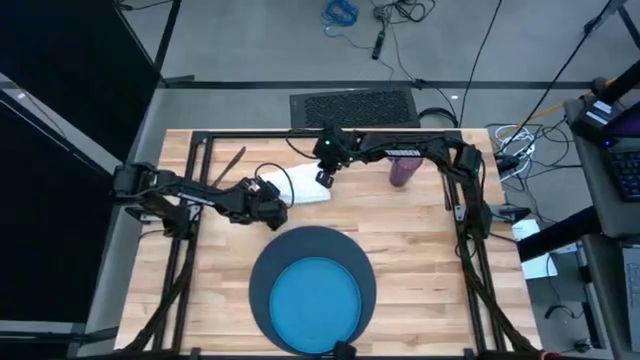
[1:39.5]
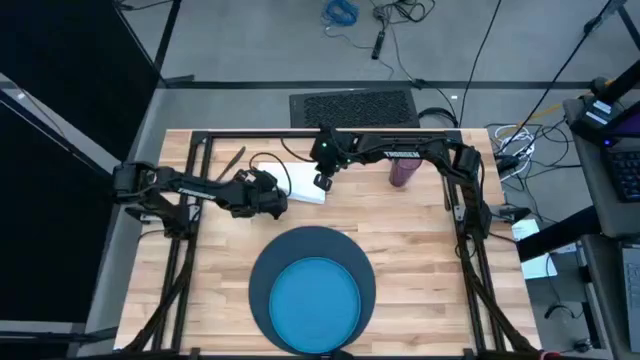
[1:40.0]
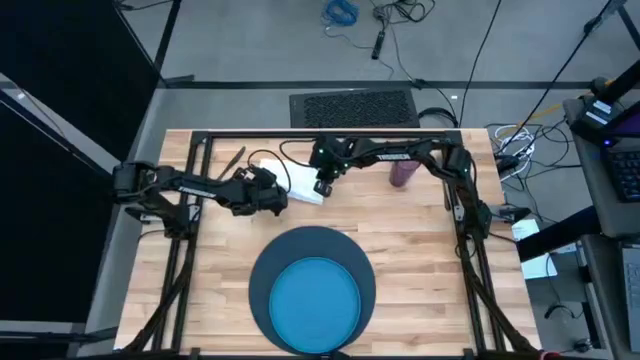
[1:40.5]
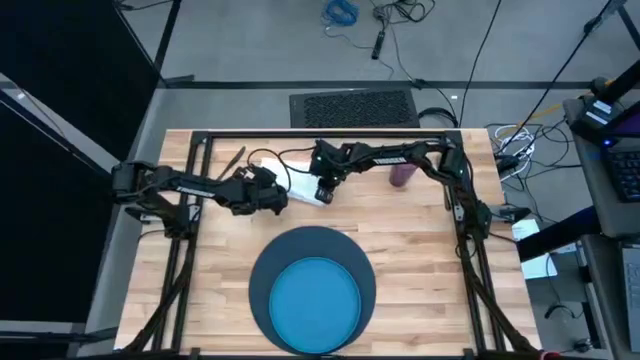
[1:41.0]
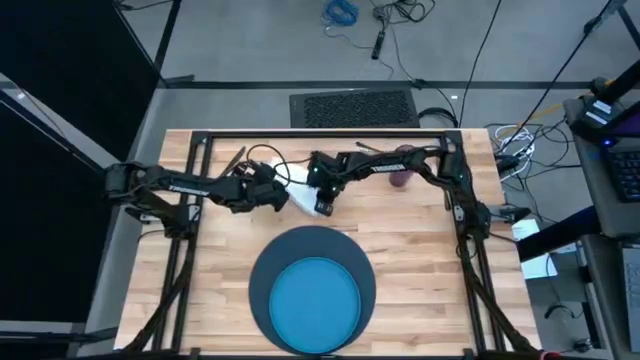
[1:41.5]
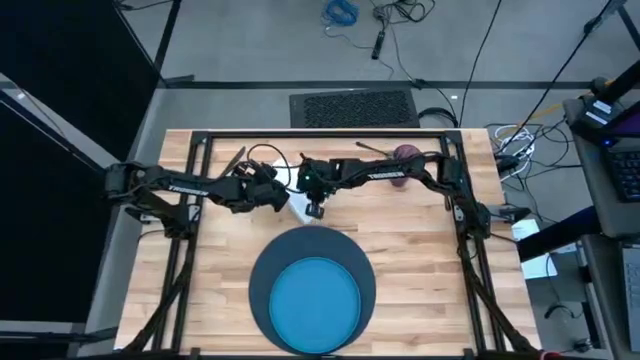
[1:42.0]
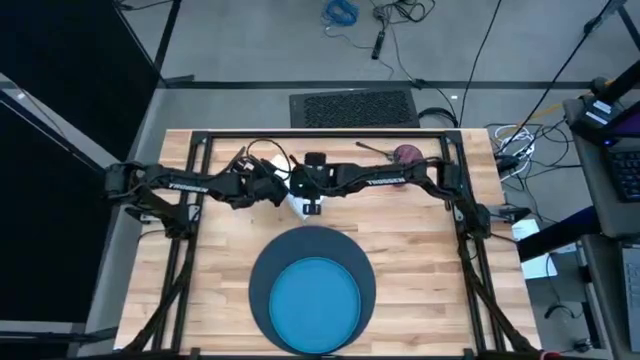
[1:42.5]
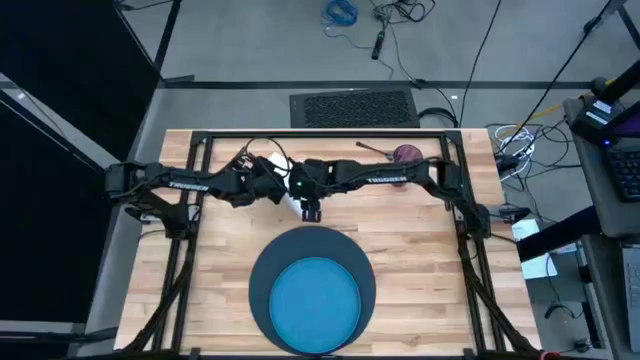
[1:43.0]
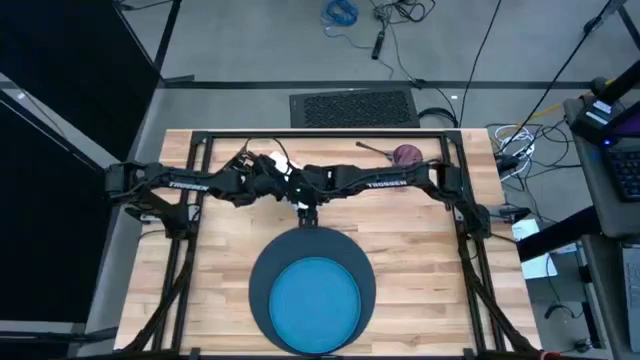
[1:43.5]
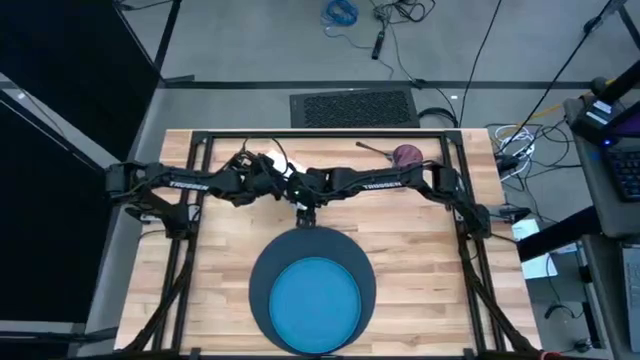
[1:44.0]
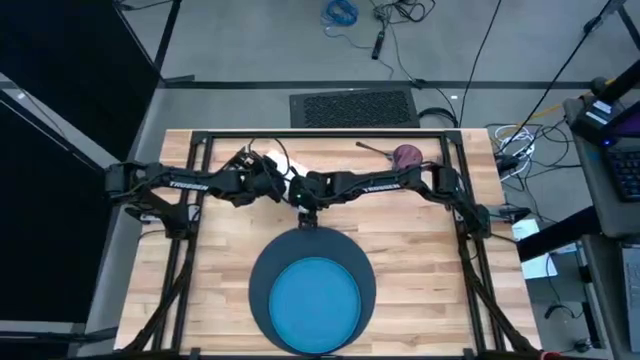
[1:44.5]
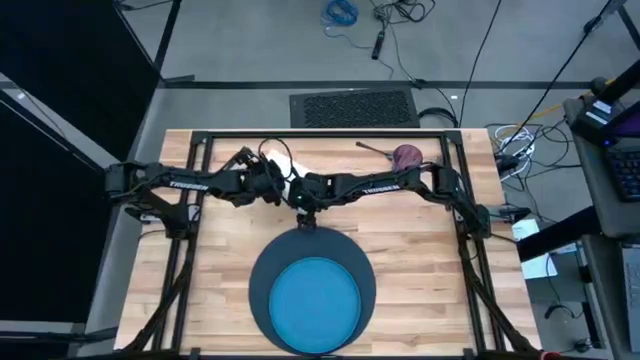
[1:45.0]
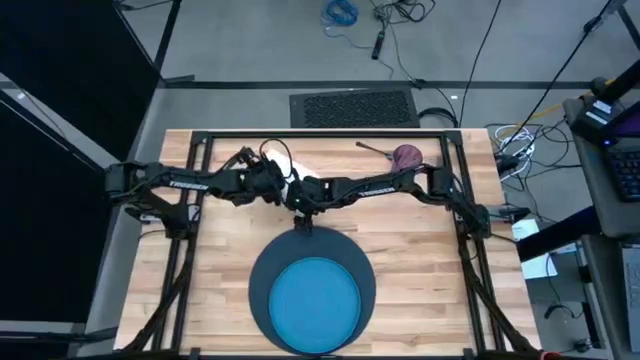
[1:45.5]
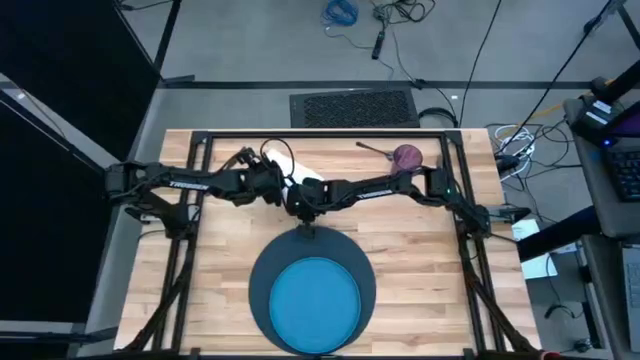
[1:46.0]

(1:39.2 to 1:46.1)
Task: Set table place
Fold the white napkin

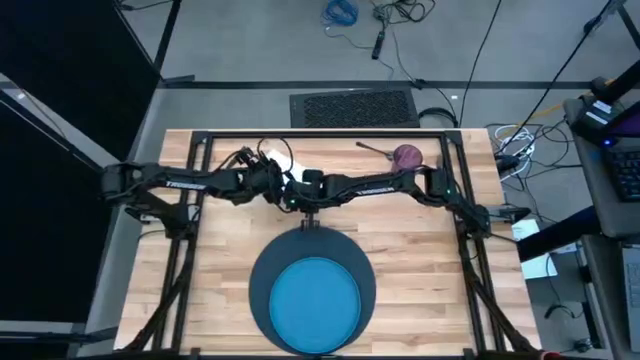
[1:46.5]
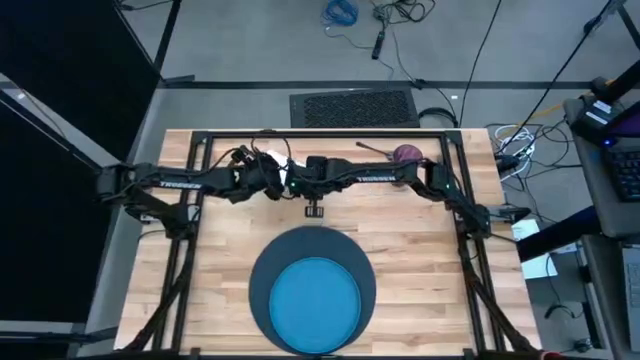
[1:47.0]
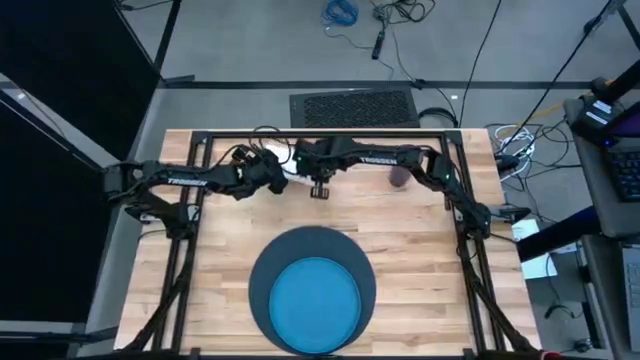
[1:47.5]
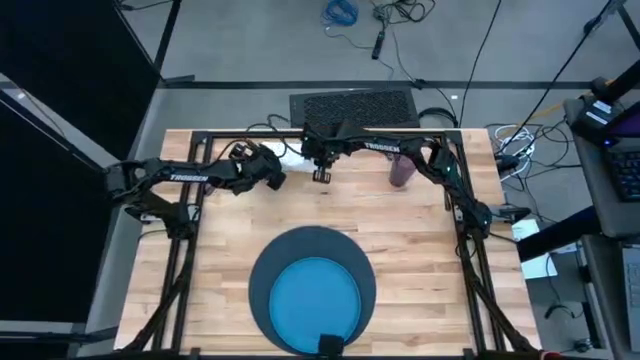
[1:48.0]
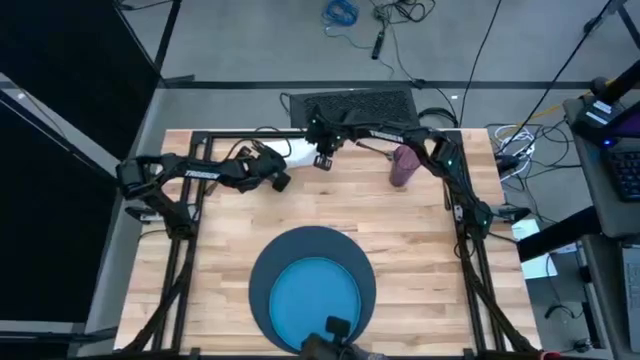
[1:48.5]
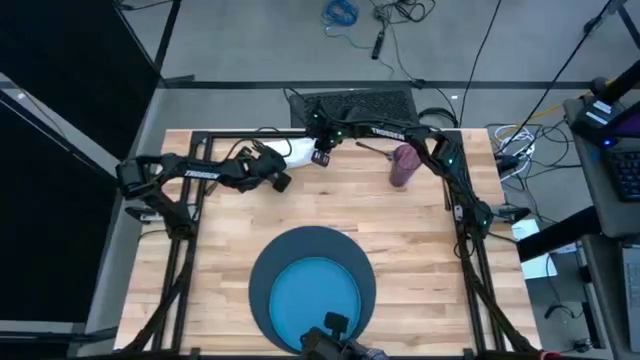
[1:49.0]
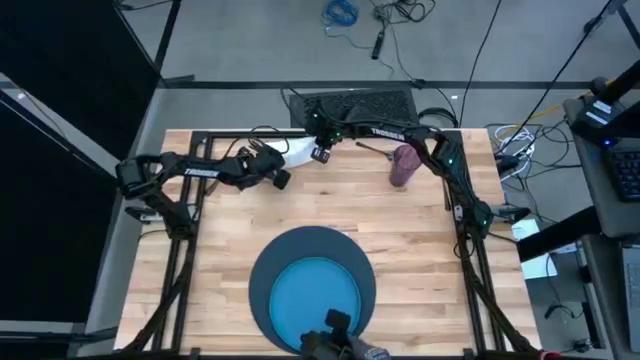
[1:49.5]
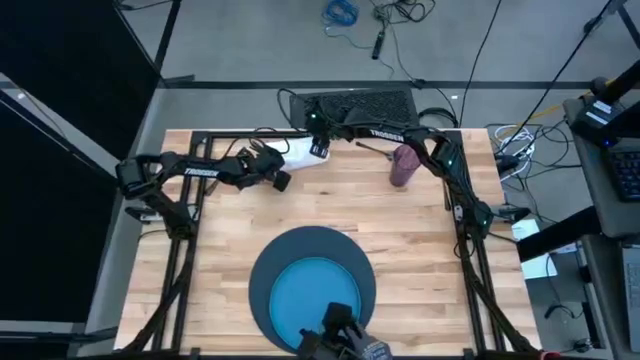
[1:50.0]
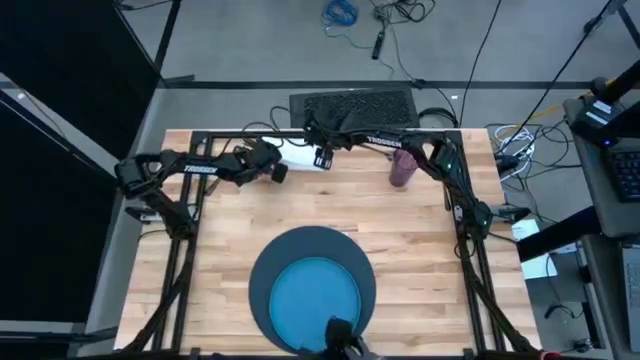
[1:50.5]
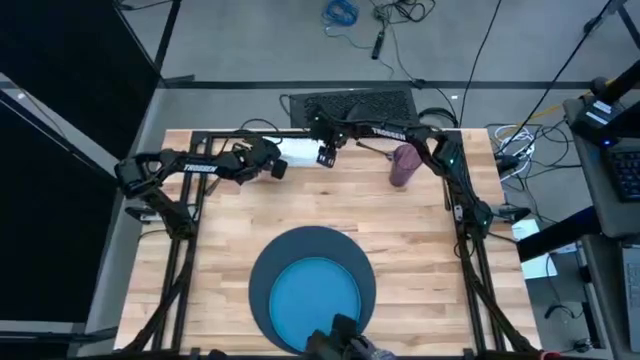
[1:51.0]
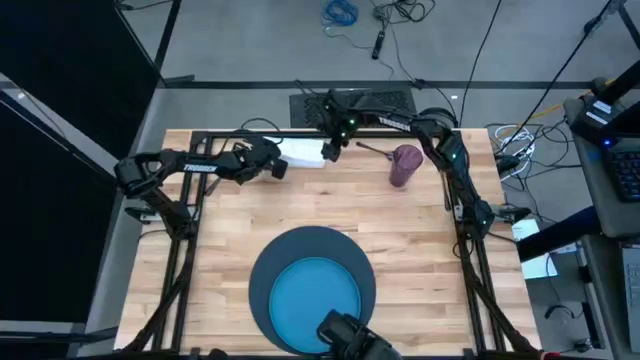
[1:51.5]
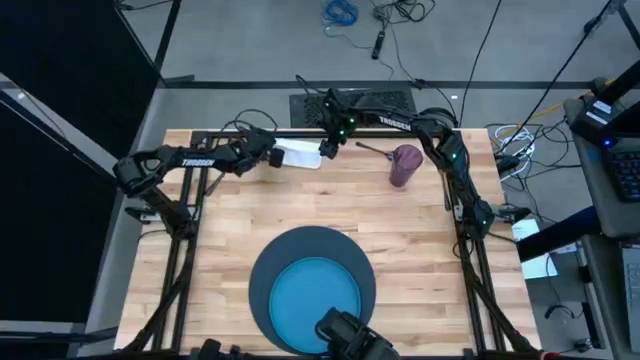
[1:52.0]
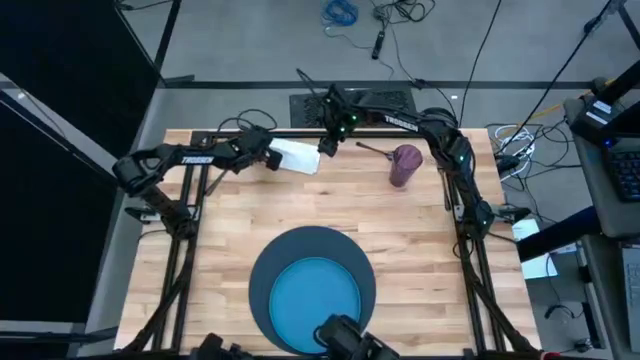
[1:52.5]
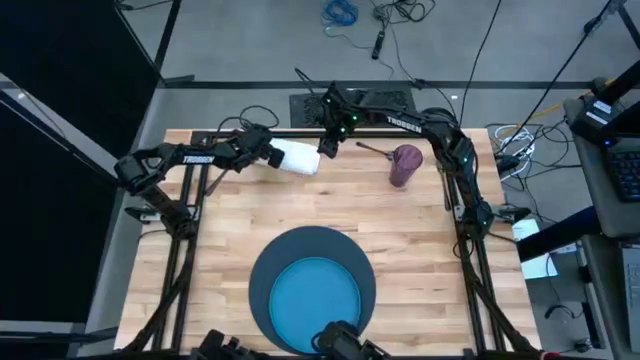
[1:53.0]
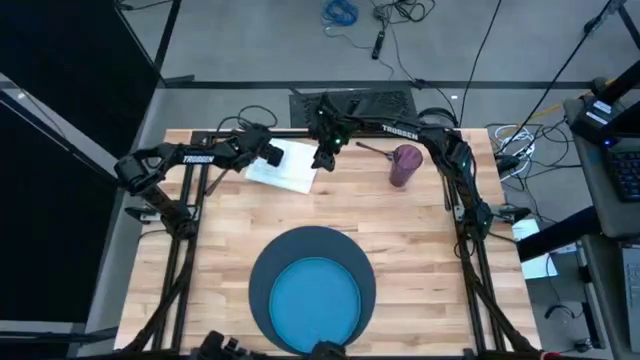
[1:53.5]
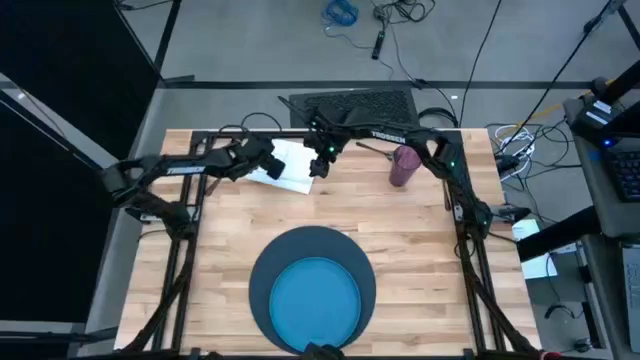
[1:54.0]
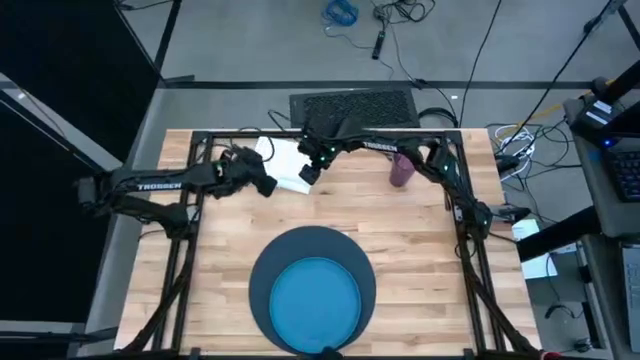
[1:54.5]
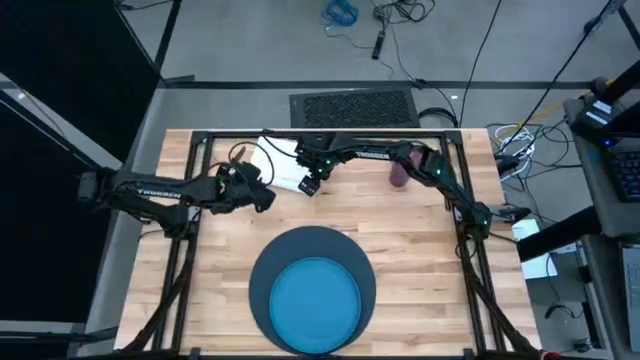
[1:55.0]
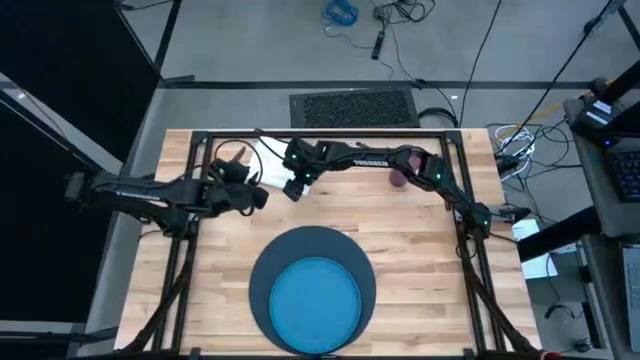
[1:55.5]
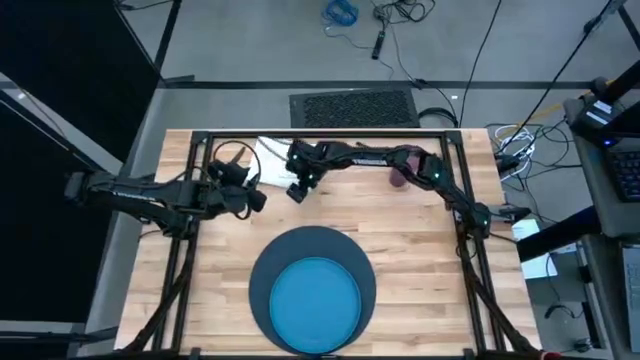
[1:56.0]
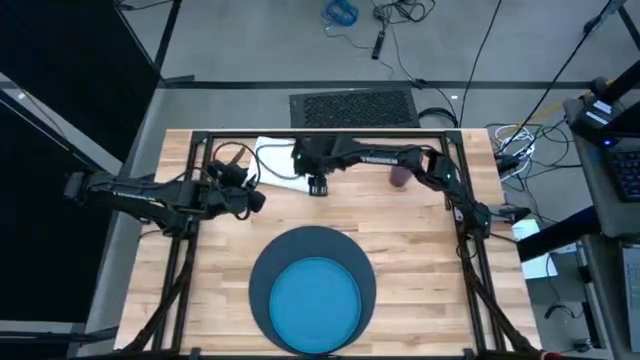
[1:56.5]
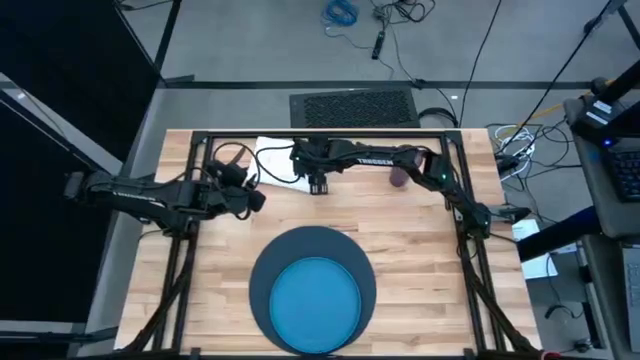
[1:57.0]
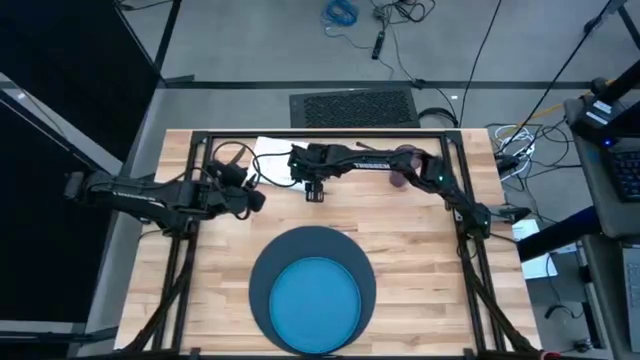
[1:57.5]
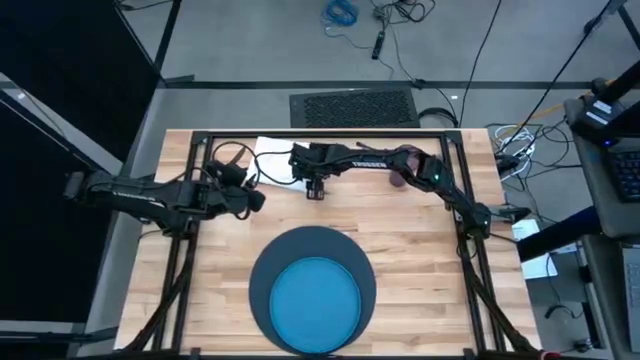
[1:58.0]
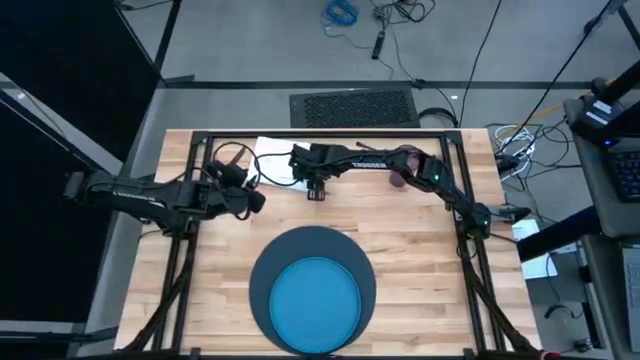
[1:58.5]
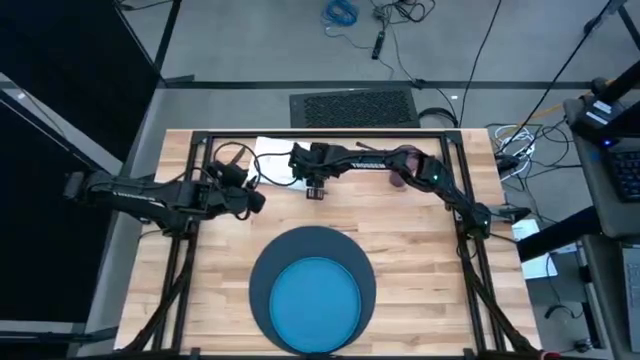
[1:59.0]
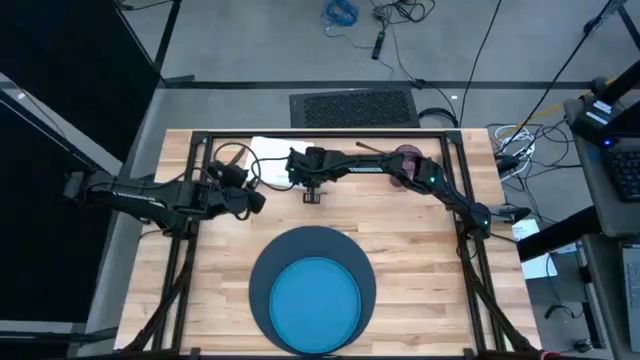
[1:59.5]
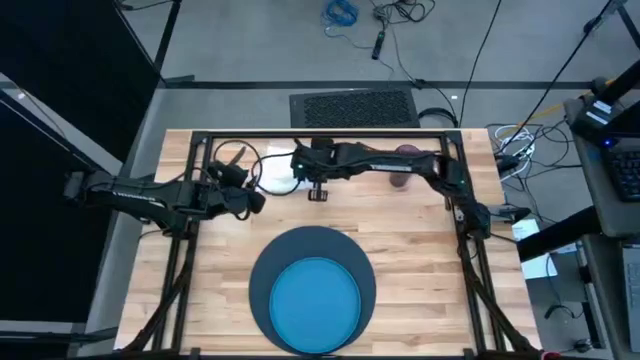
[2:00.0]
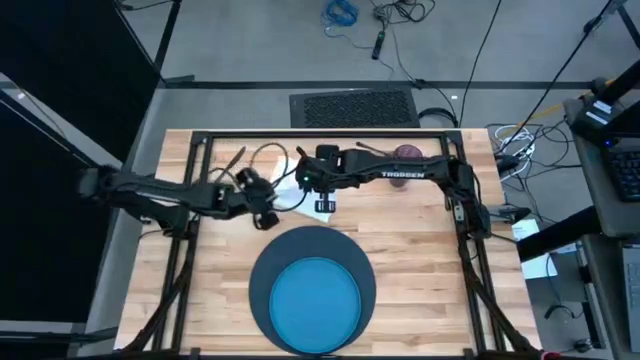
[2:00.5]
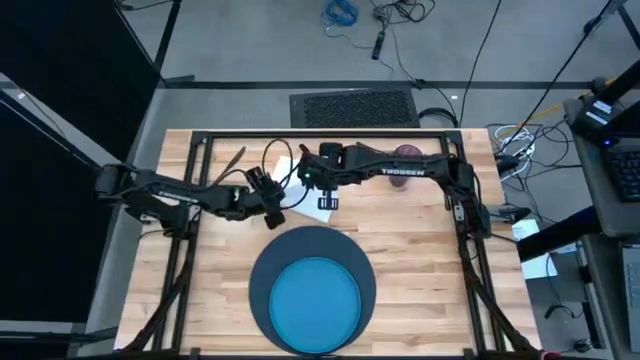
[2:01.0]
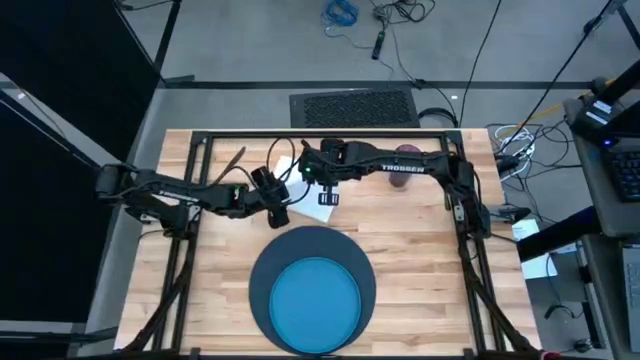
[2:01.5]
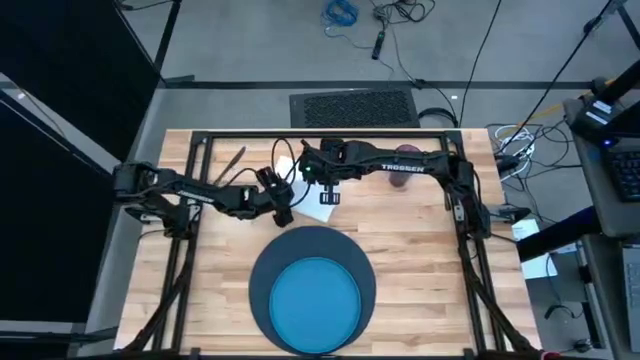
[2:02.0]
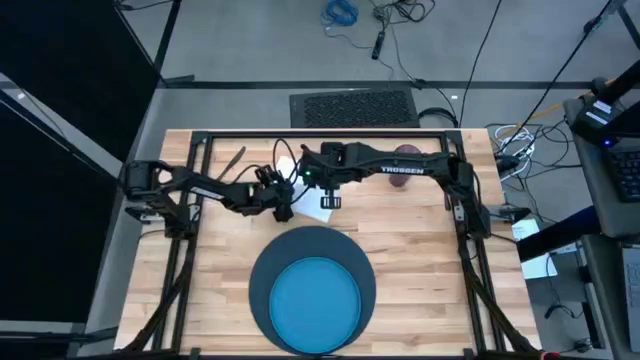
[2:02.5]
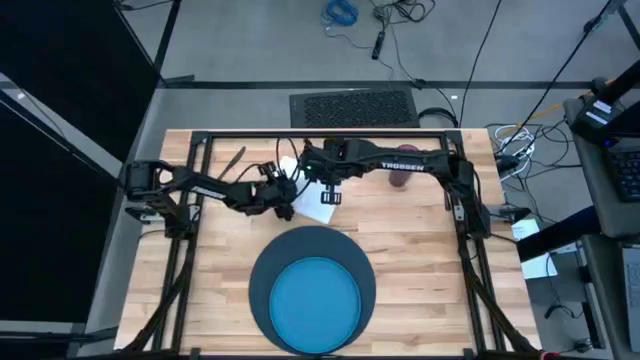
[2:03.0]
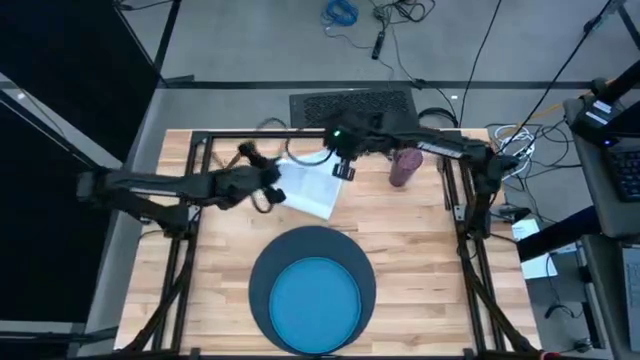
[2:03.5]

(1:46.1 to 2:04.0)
Fold the white napkin
